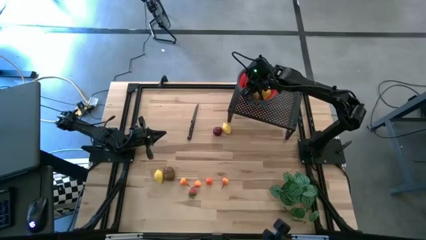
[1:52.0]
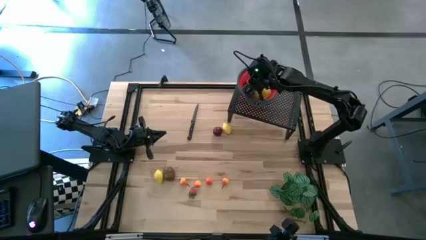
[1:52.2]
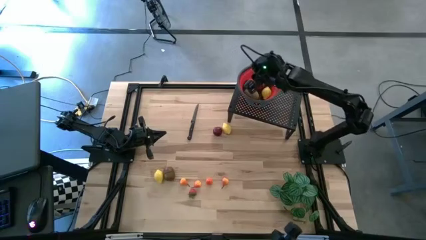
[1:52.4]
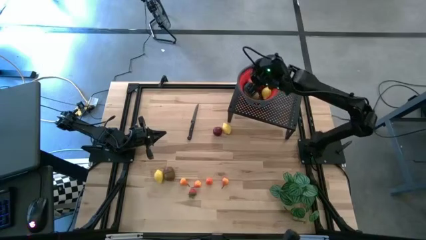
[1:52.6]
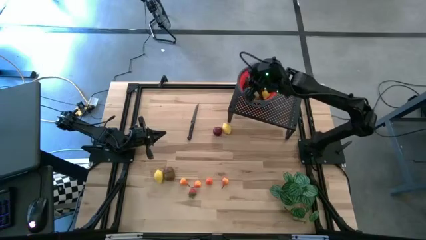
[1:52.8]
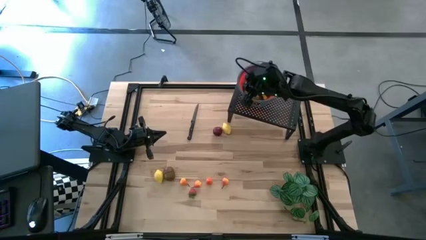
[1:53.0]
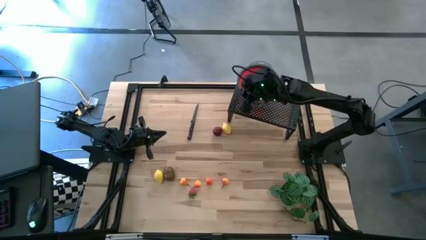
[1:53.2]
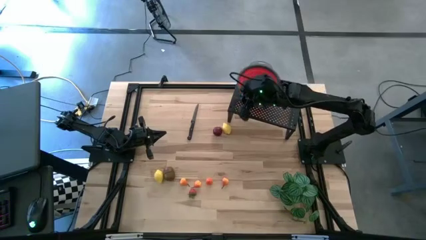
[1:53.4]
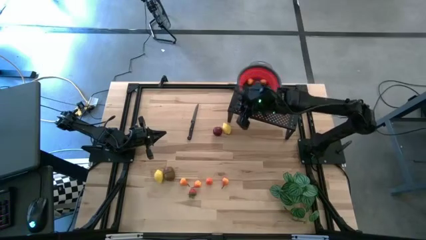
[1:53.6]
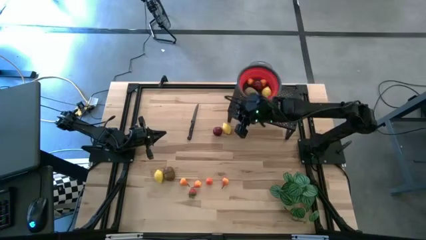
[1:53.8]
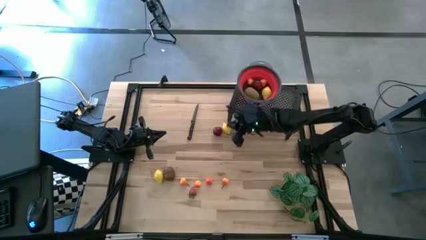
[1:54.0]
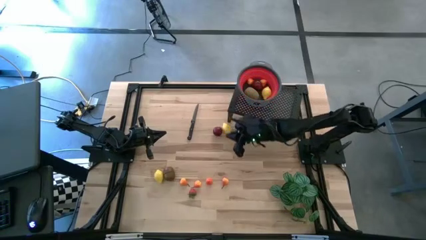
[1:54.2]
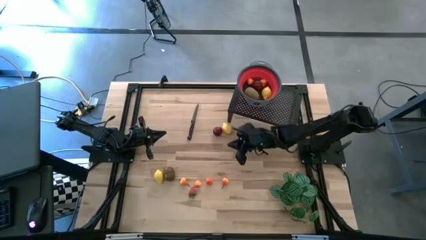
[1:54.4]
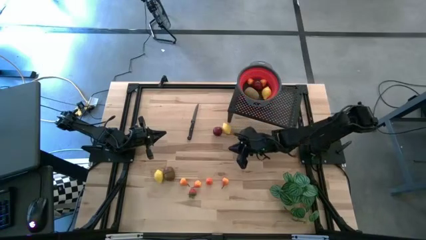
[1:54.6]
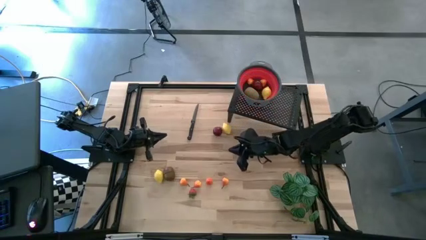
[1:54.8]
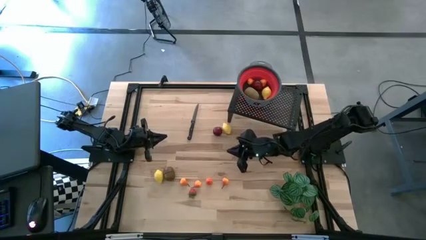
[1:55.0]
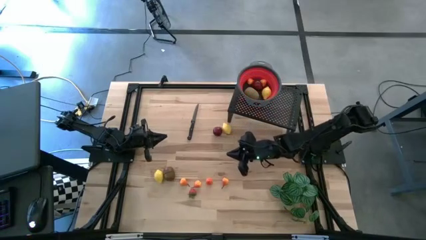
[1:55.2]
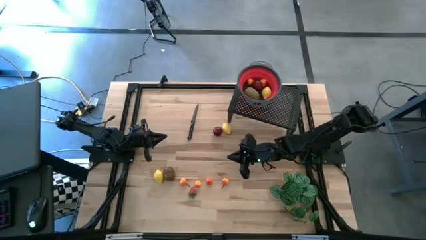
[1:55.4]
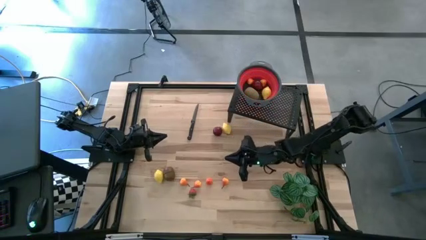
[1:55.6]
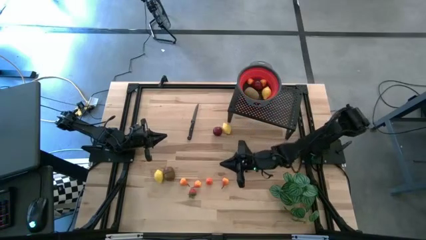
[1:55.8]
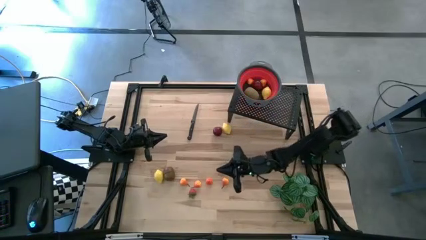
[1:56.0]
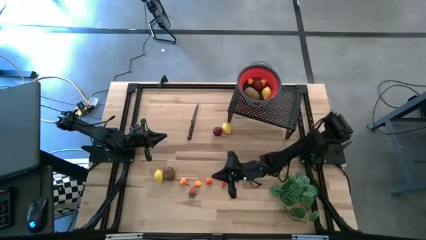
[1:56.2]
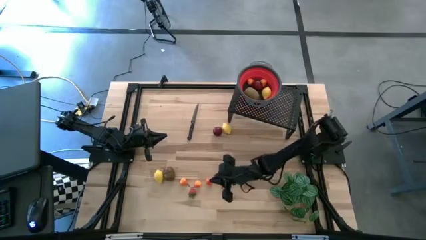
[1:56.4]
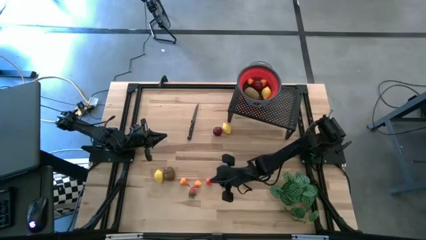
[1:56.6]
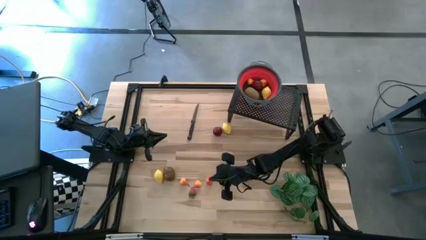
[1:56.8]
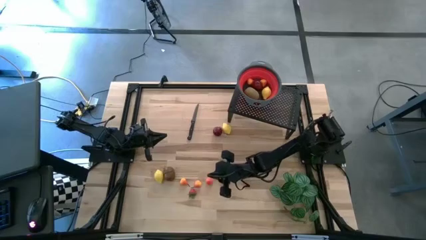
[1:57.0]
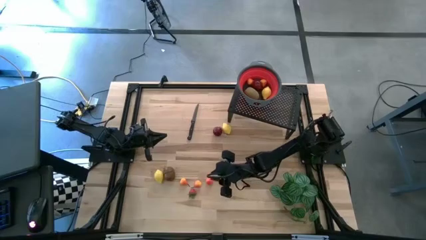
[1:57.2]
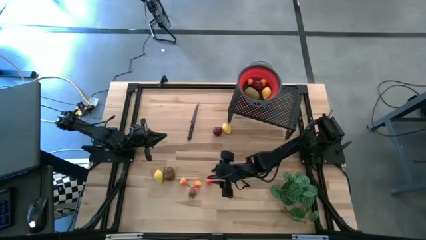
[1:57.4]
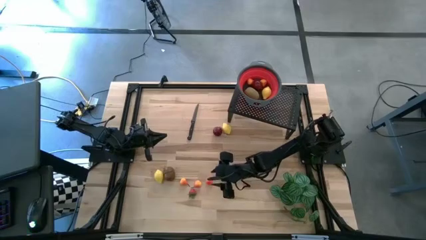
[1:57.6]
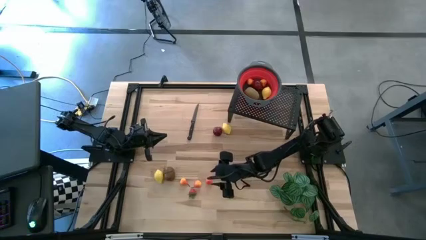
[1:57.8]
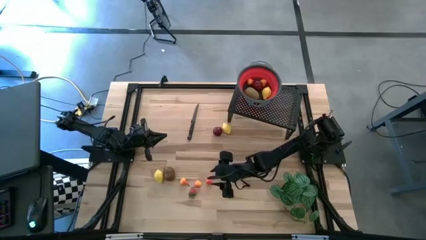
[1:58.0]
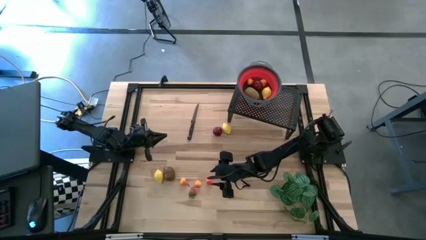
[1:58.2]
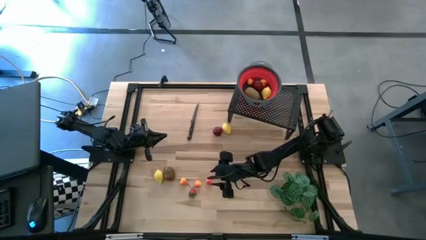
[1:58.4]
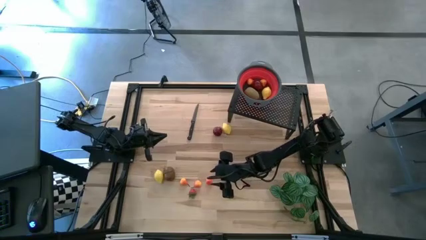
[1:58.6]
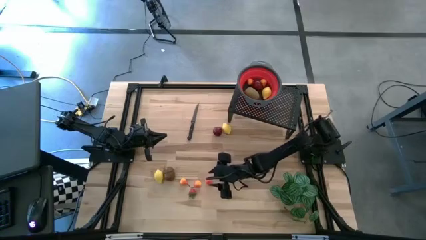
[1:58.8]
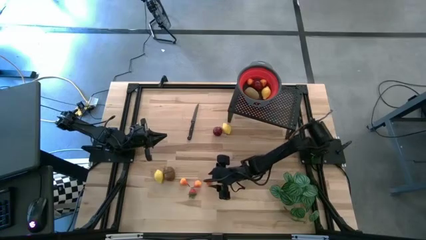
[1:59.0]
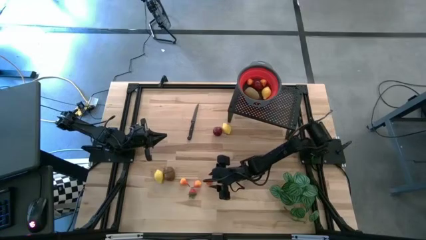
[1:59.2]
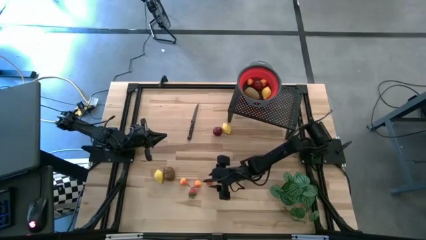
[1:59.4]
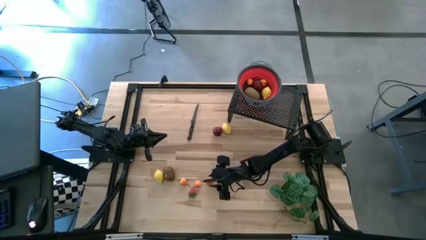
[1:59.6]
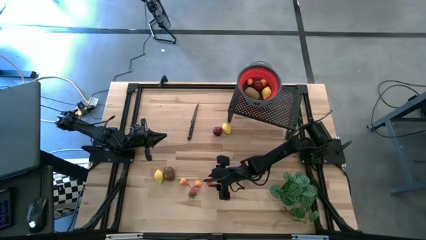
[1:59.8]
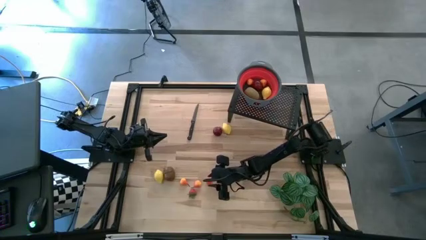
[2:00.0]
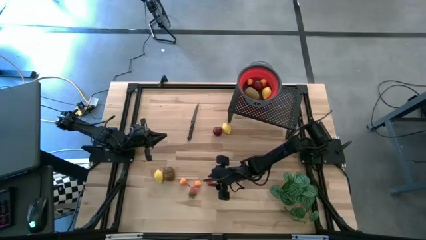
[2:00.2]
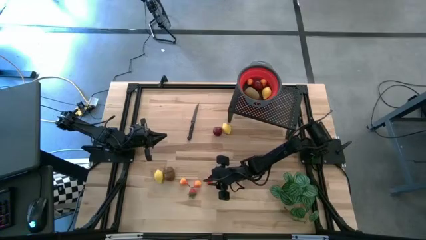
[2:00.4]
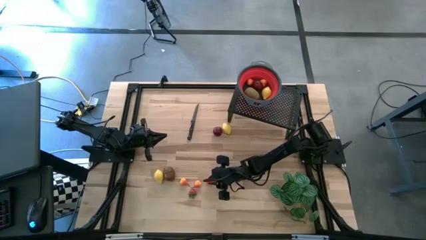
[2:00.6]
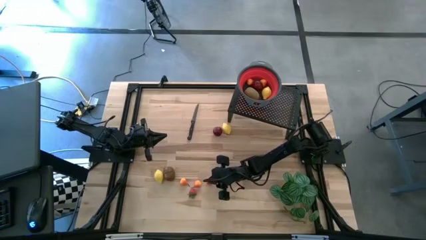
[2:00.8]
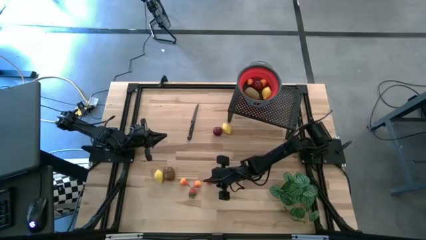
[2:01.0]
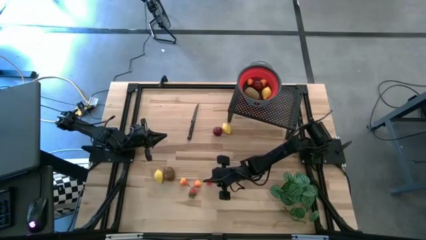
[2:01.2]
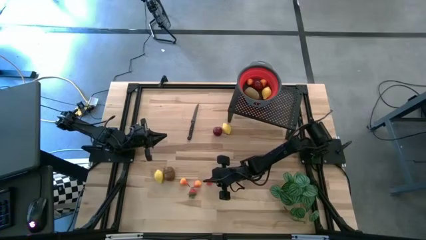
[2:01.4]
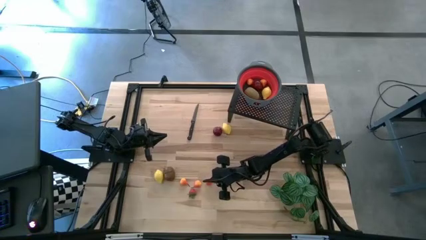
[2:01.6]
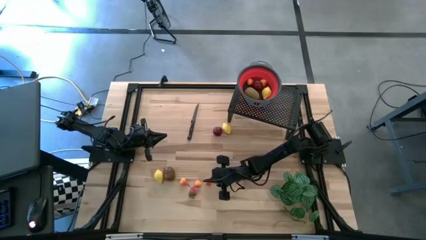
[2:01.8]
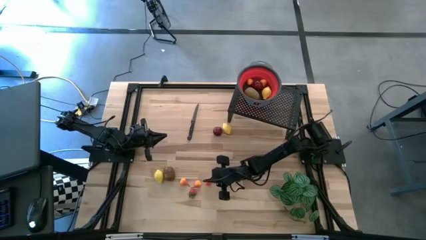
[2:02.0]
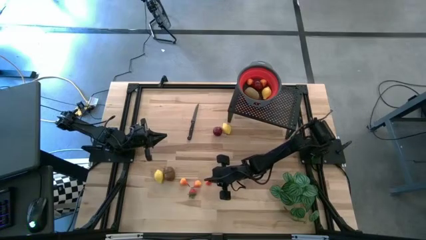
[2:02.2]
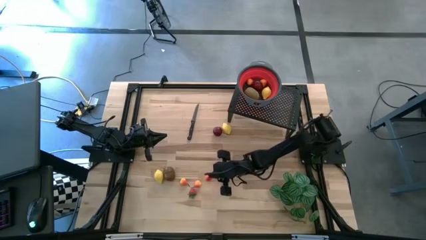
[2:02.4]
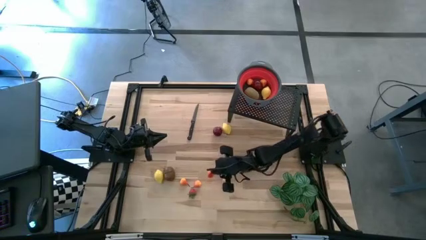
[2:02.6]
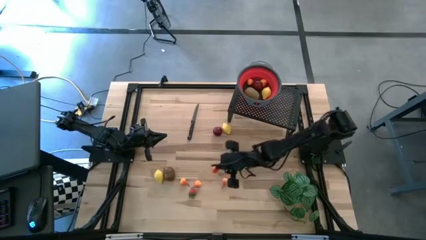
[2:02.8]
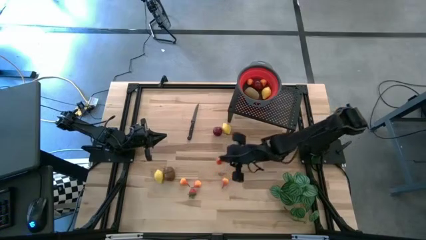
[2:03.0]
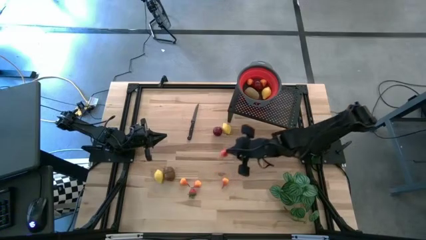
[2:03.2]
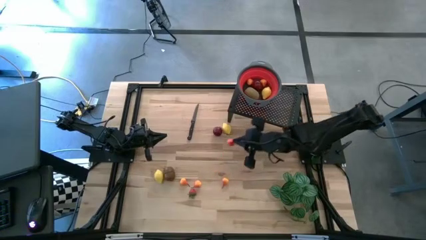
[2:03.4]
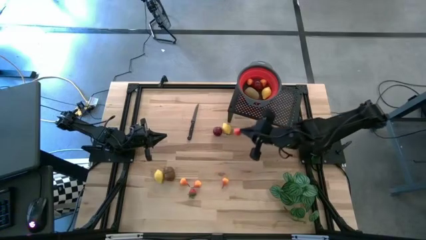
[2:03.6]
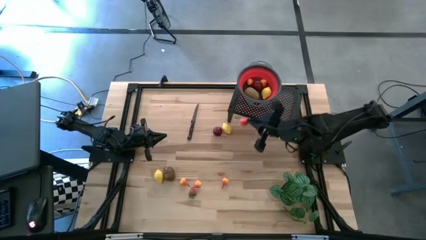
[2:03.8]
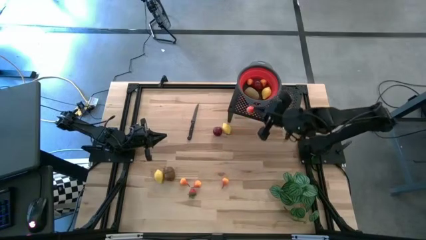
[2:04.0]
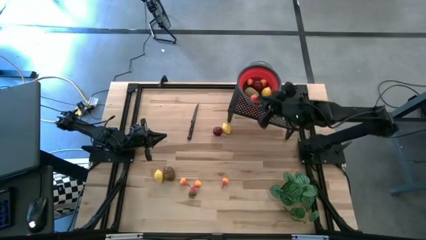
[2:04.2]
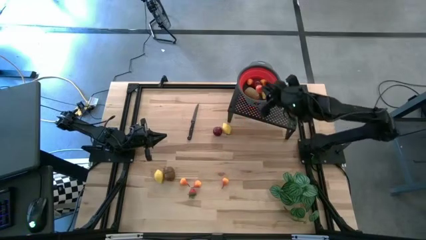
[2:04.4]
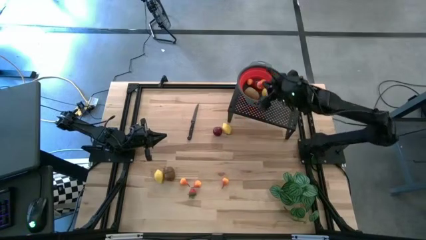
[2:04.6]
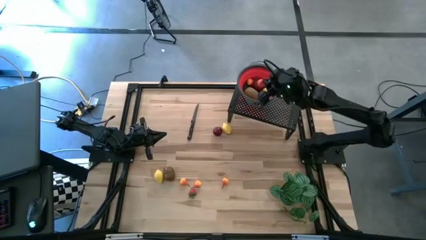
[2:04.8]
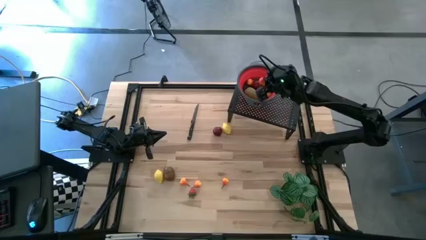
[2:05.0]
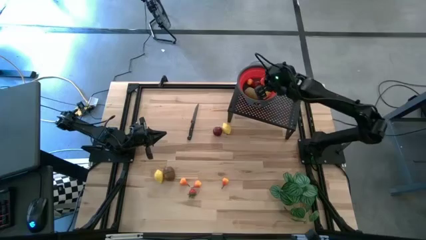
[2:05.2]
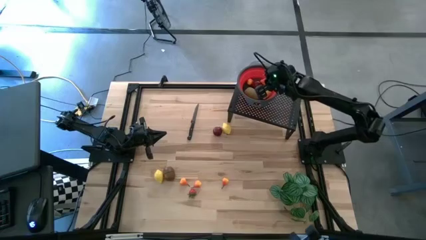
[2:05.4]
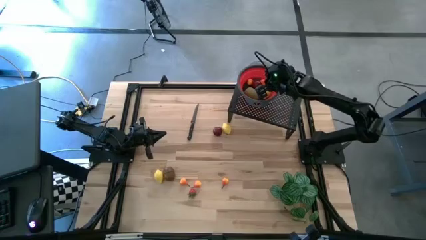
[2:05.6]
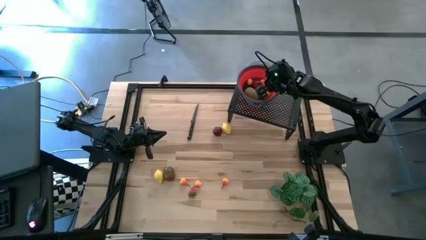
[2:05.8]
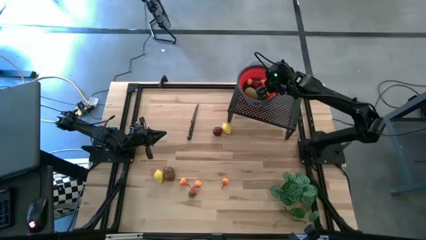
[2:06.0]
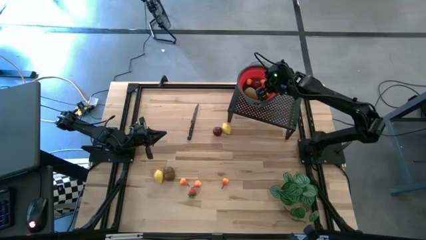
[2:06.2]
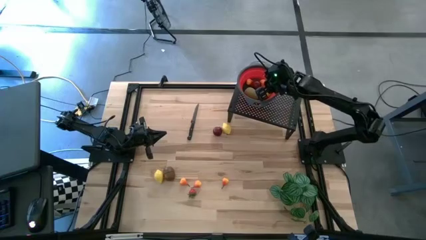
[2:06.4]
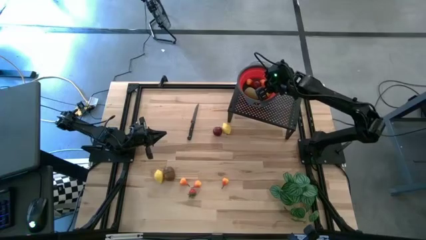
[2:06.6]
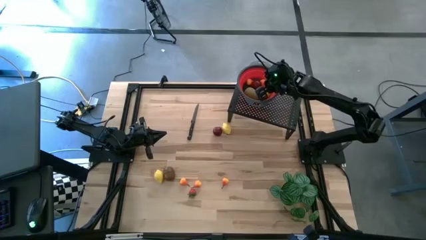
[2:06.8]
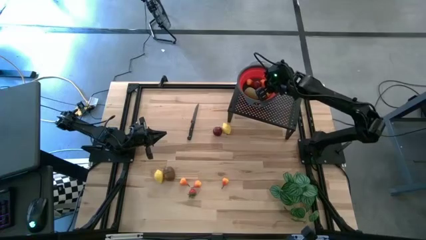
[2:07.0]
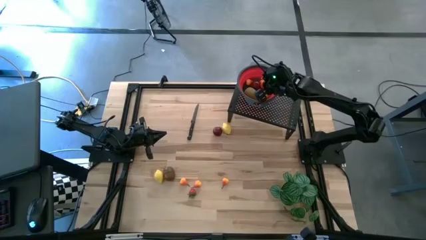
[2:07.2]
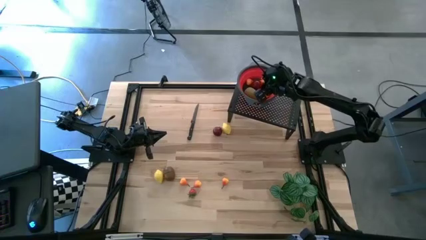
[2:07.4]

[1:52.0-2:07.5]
Task: Pick & Place Fruit
Put the orange pear into the red strainer bowl on the shelf

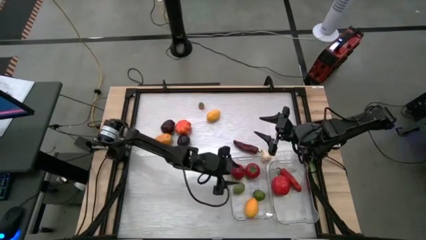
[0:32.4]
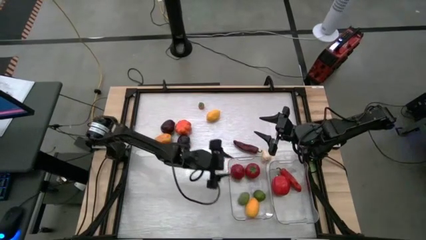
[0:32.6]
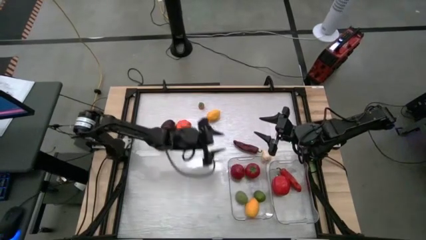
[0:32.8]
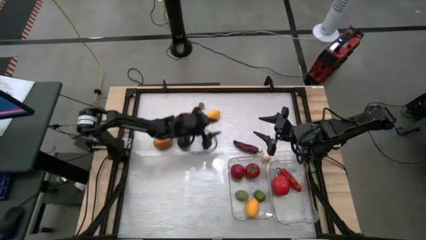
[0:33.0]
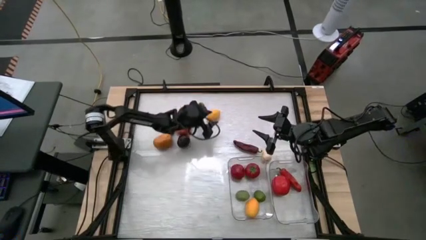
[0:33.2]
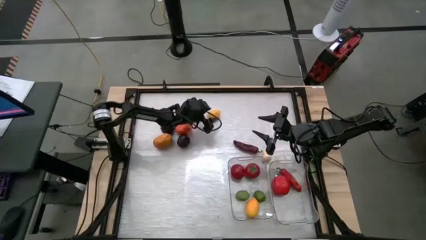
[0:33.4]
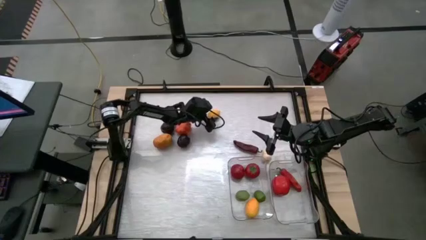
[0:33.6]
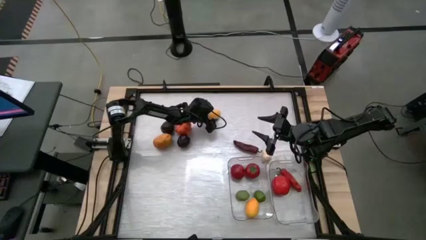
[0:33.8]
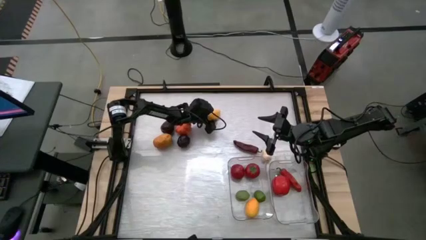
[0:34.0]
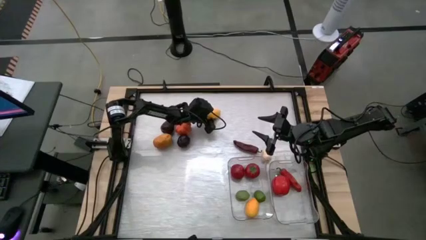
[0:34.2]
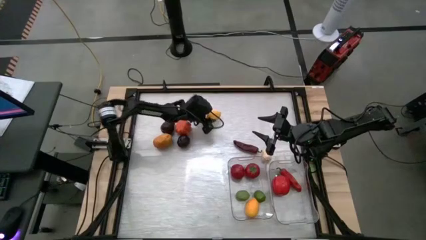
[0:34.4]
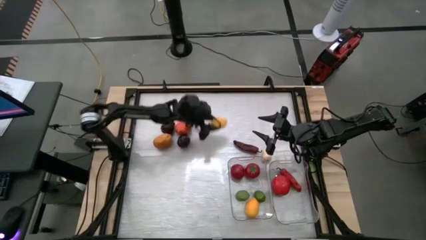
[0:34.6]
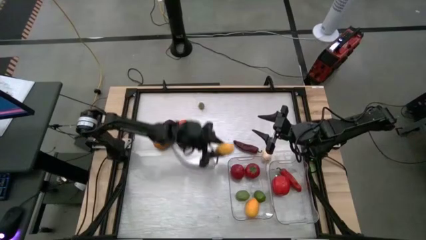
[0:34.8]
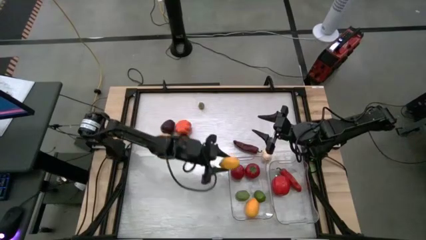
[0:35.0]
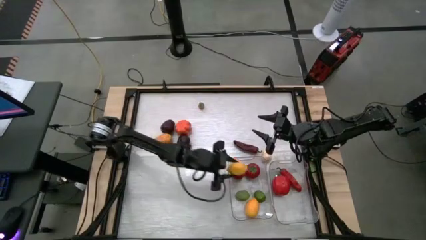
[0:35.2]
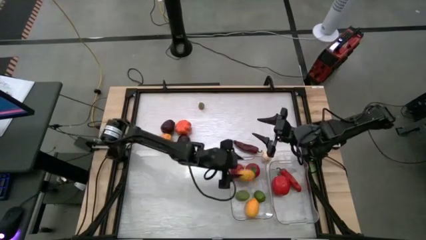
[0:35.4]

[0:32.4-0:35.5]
Task: Sort produce into baskets
Put the lemon into the left transparent bin
